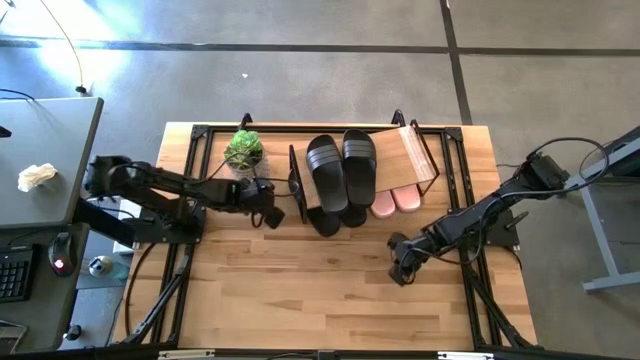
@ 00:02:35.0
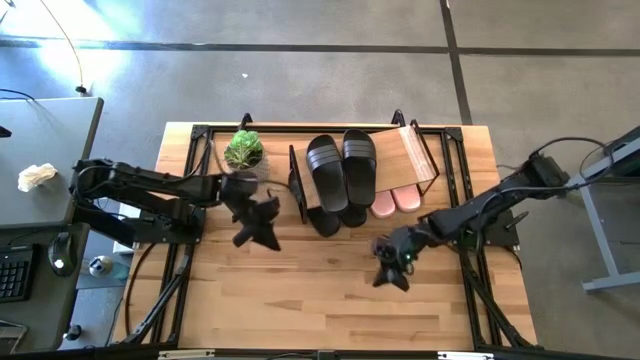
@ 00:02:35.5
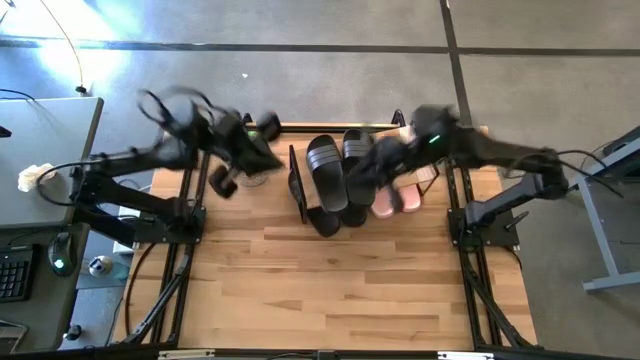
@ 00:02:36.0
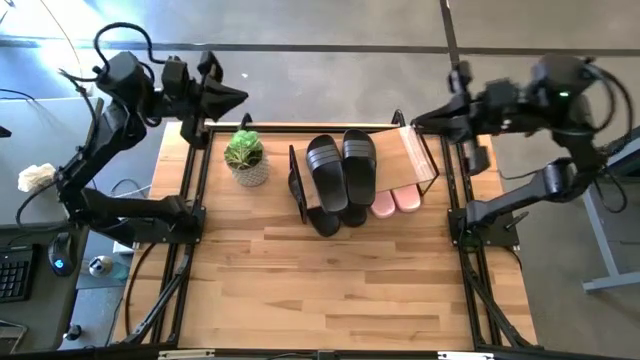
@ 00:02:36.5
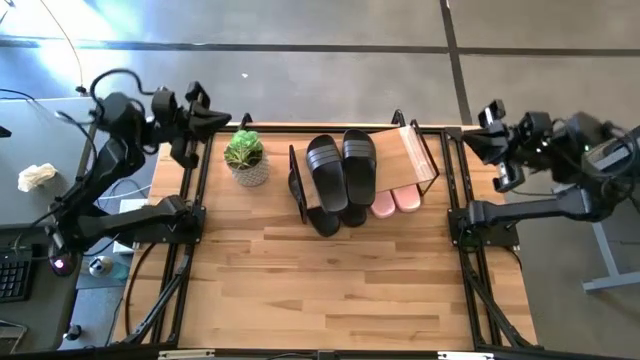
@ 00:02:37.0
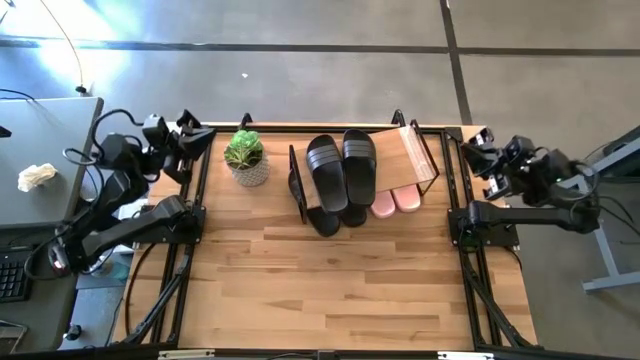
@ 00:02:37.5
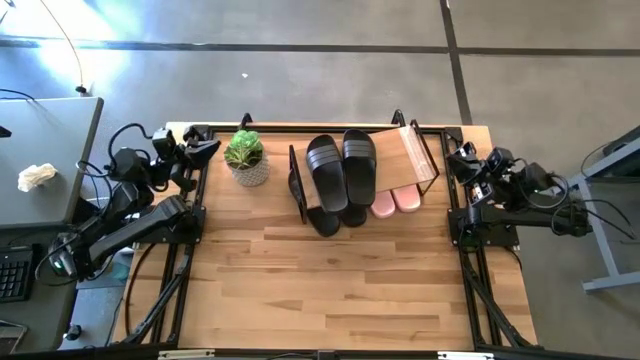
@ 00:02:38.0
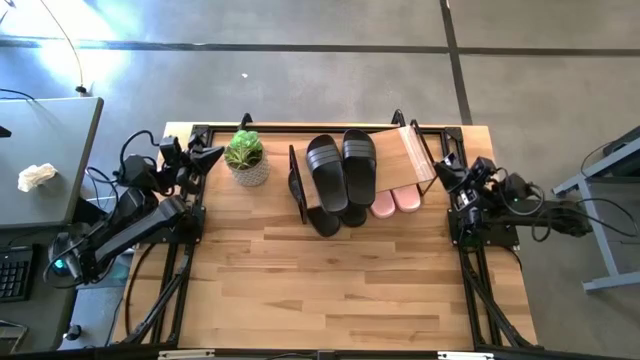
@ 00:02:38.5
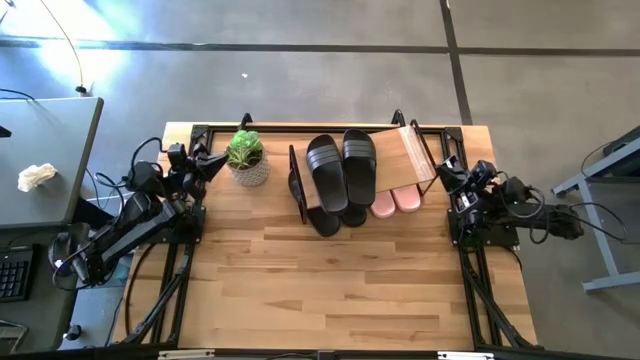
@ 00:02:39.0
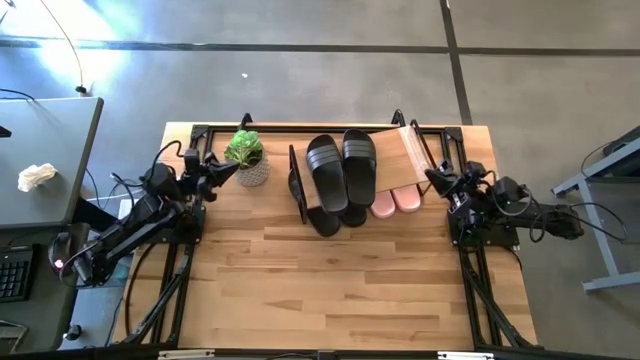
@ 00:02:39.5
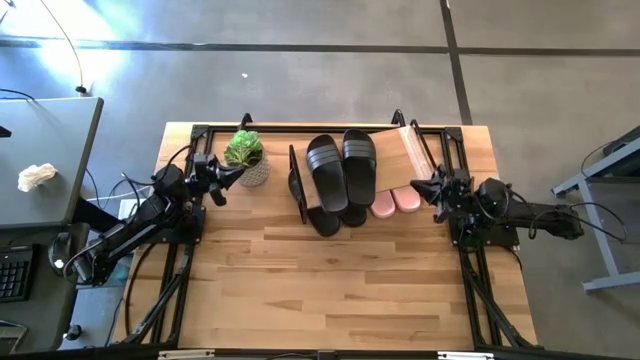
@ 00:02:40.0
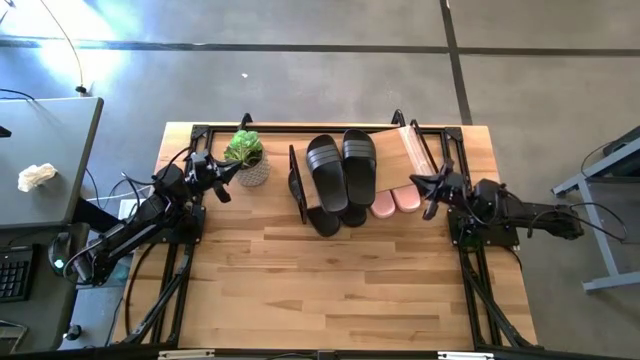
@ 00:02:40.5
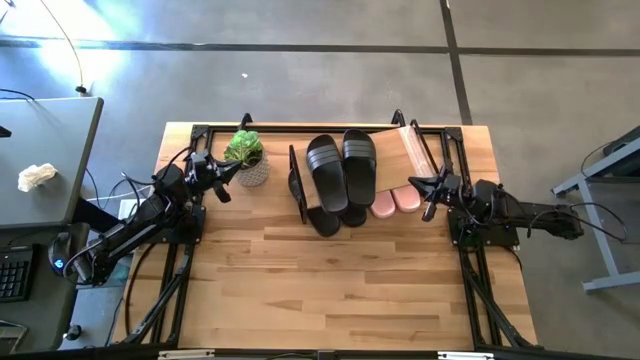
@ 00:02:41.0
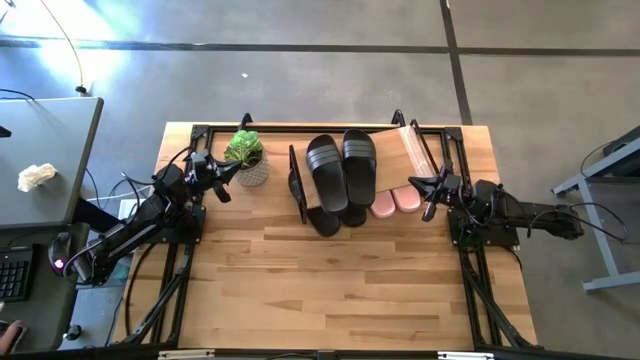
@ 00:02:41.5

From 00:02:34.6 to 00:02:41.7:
Task: Pick and place slides into the shelf
Return to Home Position

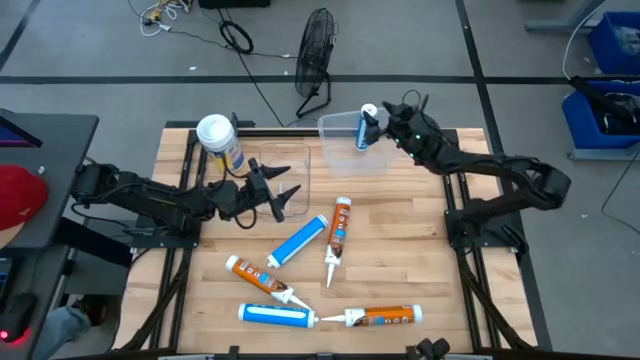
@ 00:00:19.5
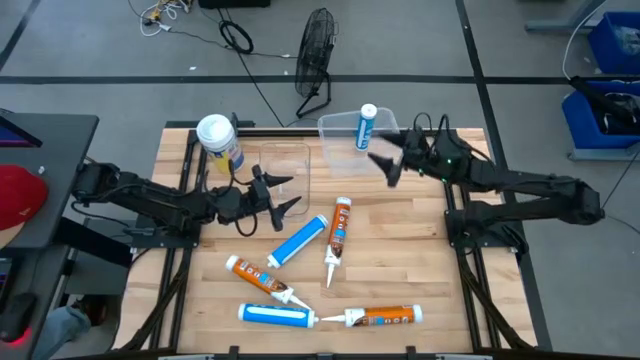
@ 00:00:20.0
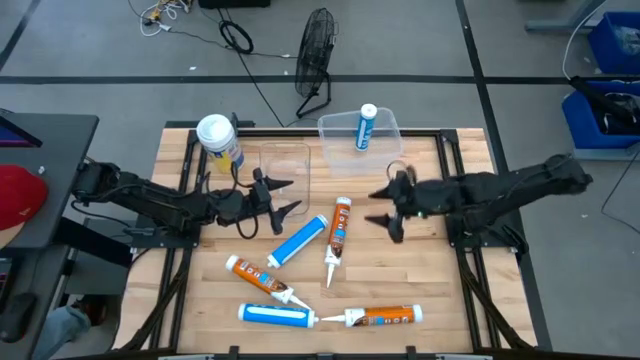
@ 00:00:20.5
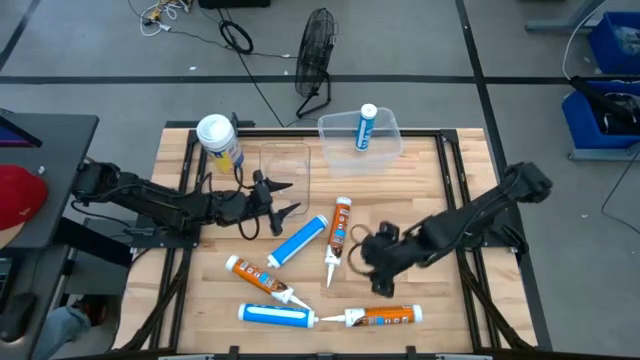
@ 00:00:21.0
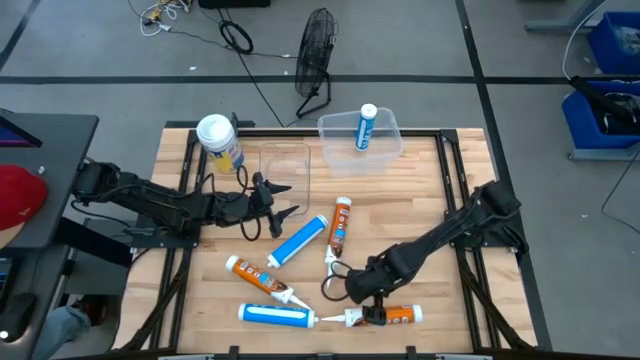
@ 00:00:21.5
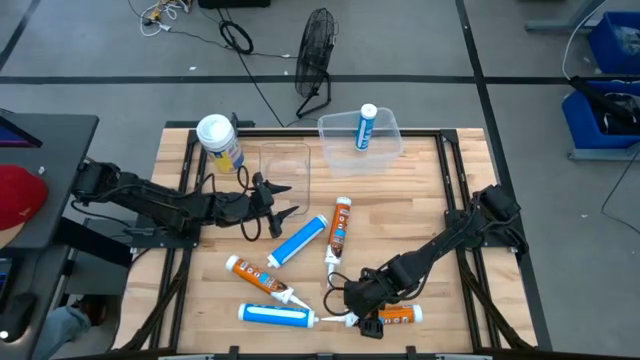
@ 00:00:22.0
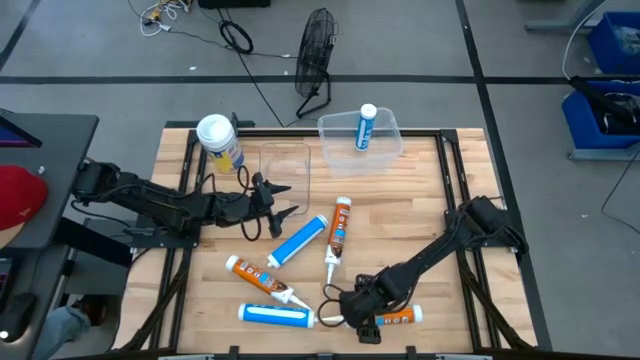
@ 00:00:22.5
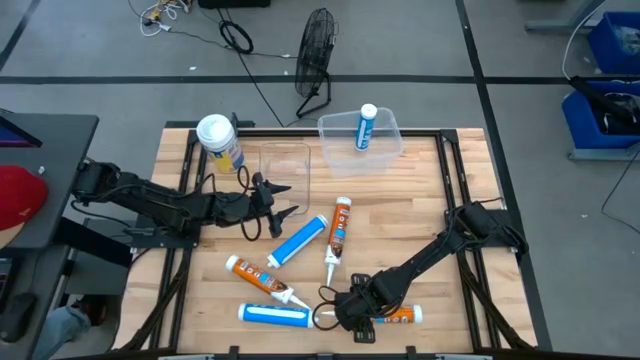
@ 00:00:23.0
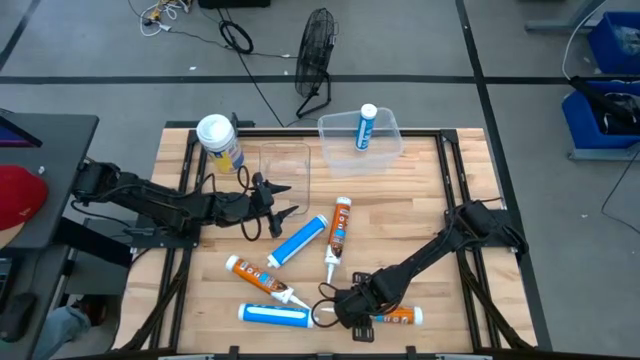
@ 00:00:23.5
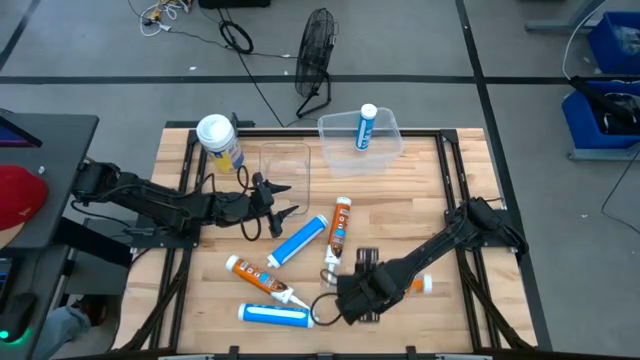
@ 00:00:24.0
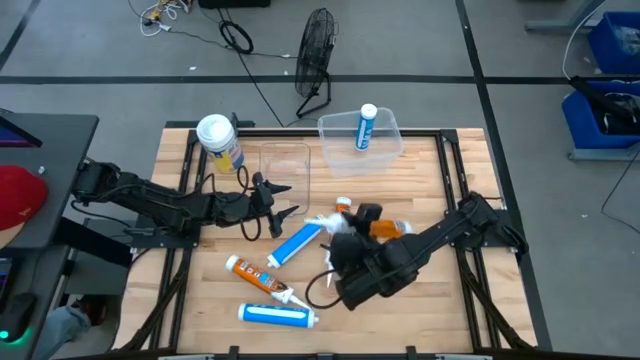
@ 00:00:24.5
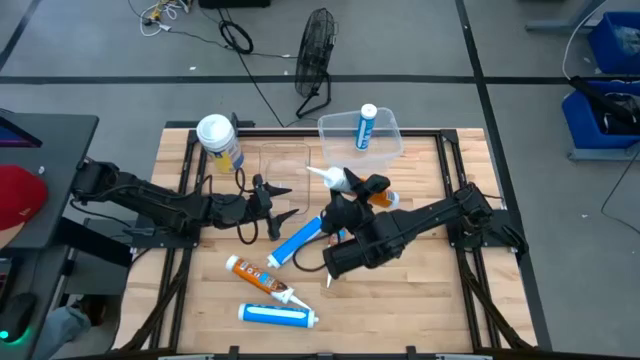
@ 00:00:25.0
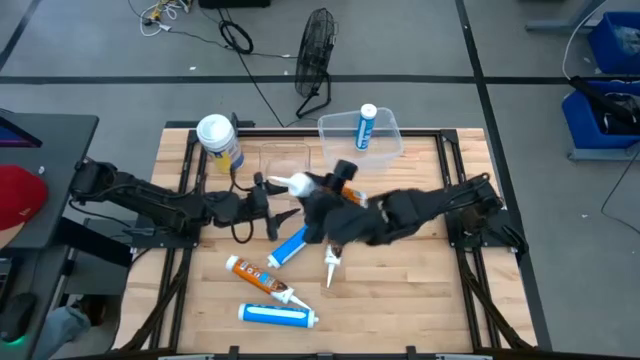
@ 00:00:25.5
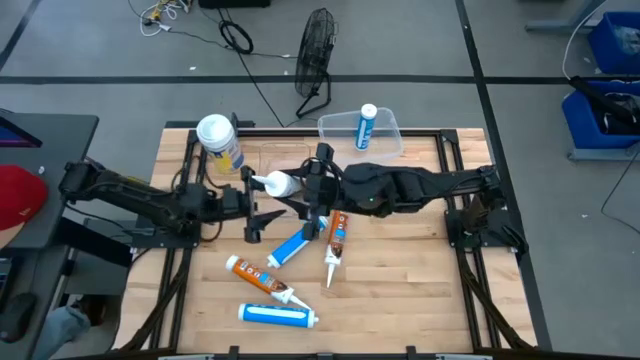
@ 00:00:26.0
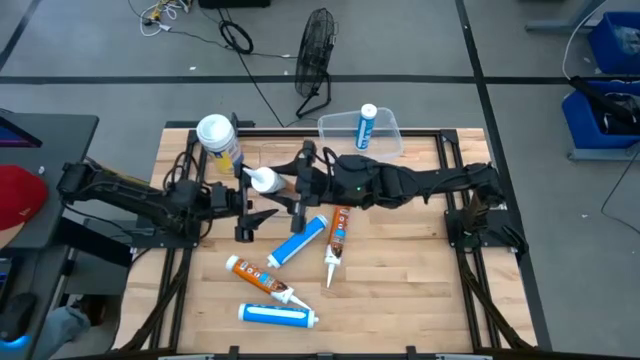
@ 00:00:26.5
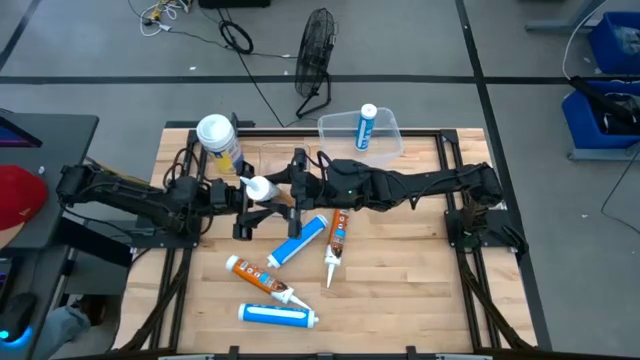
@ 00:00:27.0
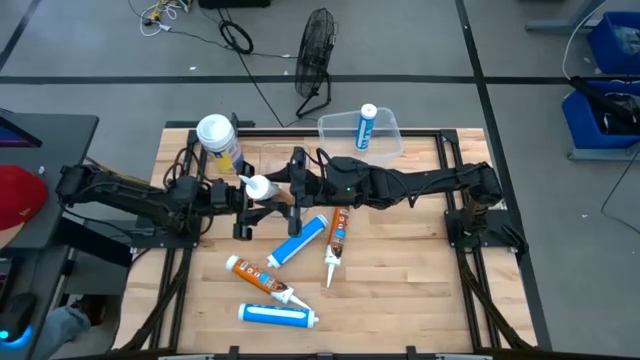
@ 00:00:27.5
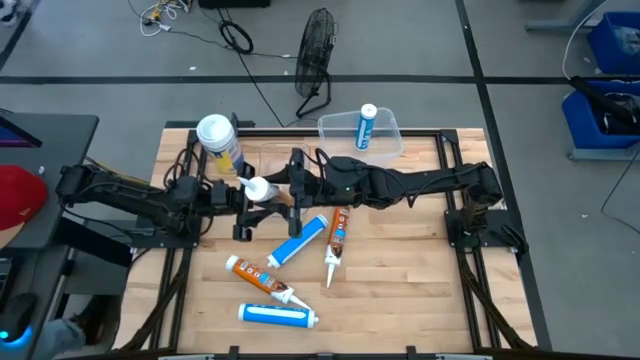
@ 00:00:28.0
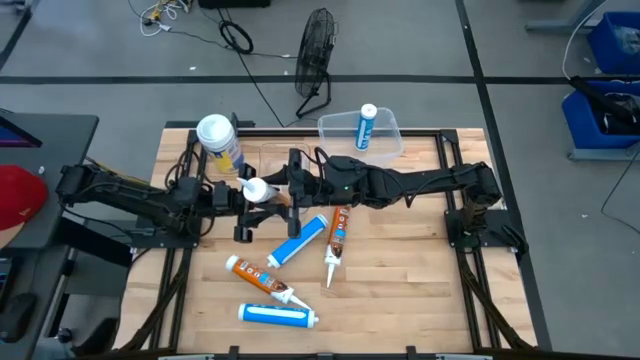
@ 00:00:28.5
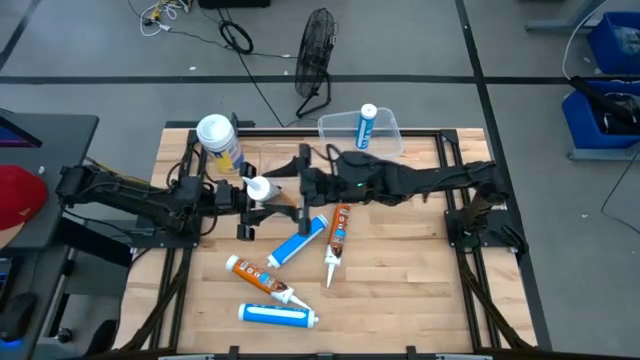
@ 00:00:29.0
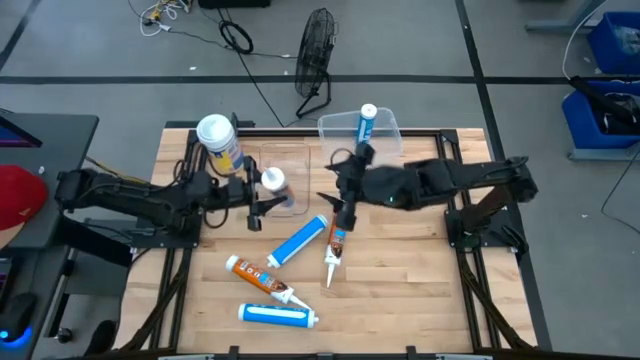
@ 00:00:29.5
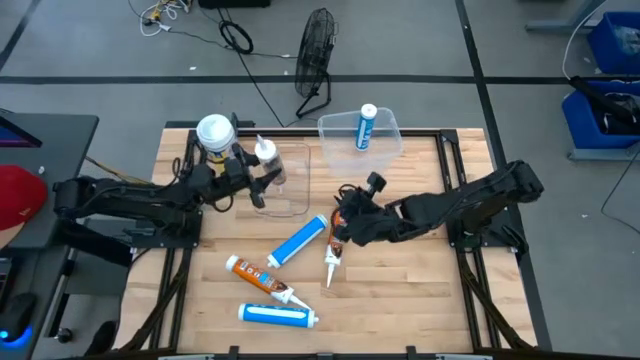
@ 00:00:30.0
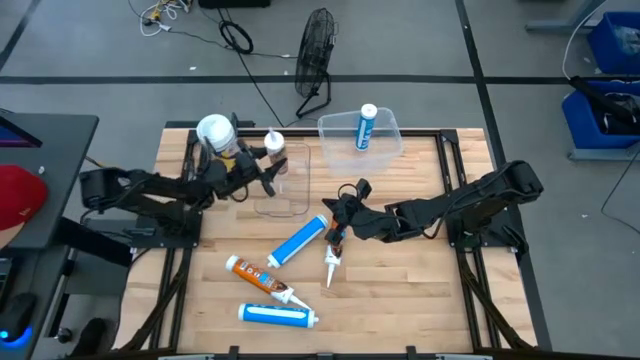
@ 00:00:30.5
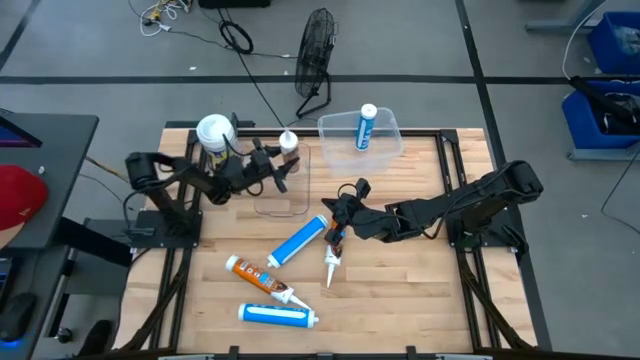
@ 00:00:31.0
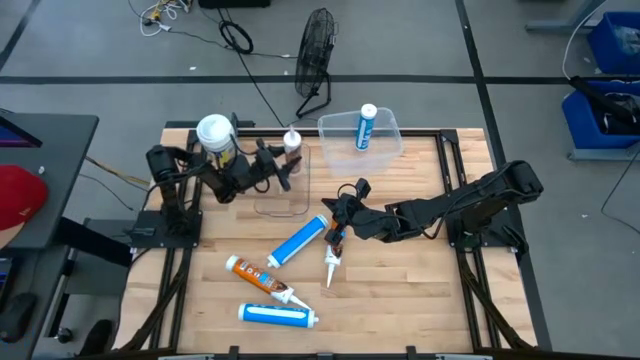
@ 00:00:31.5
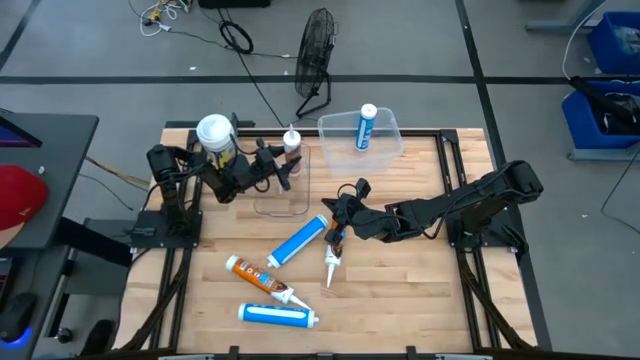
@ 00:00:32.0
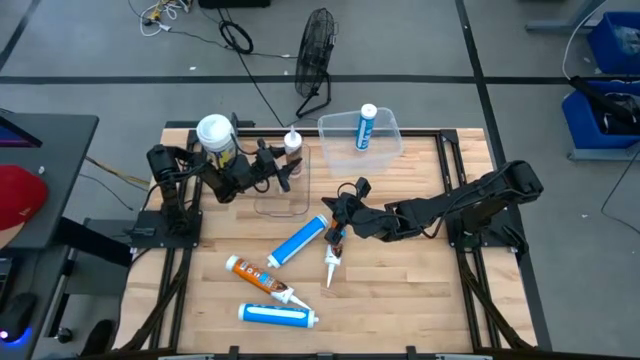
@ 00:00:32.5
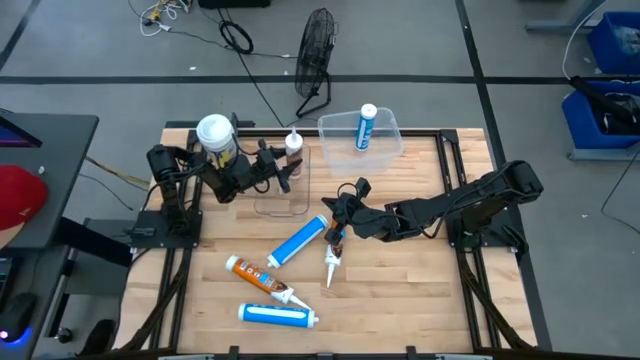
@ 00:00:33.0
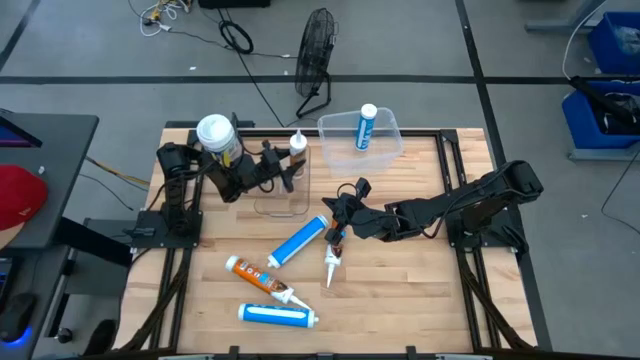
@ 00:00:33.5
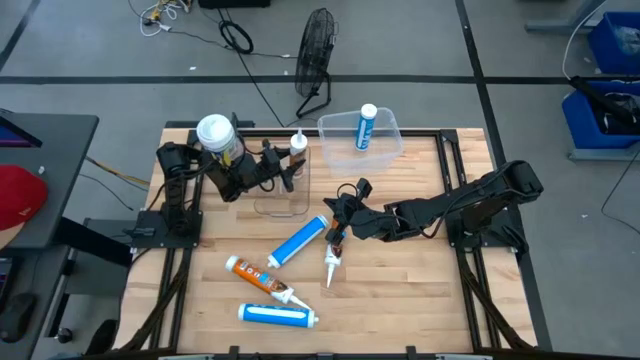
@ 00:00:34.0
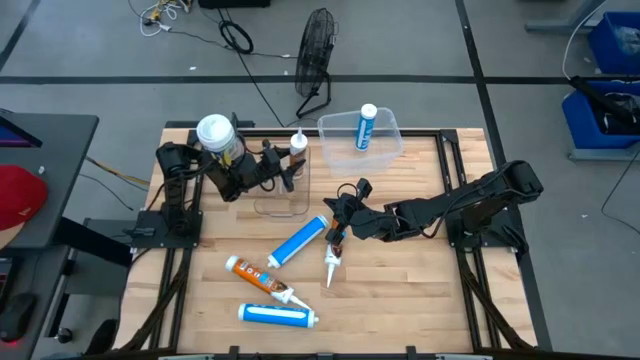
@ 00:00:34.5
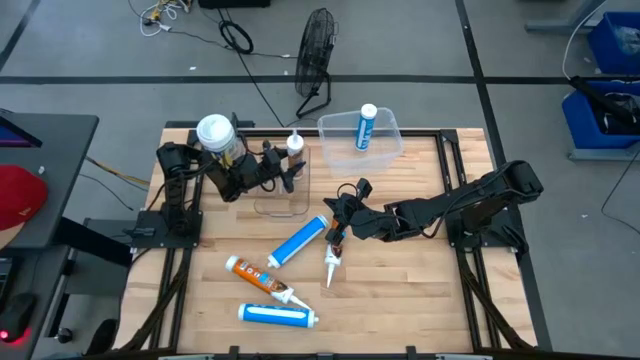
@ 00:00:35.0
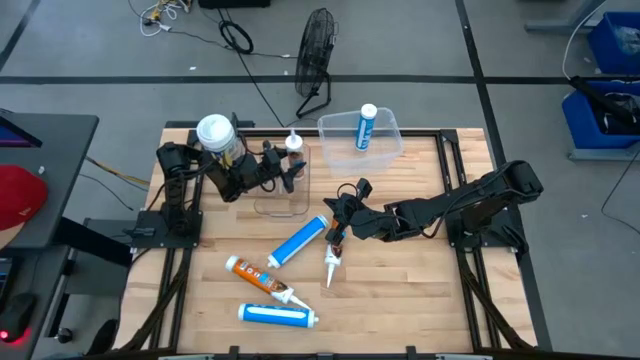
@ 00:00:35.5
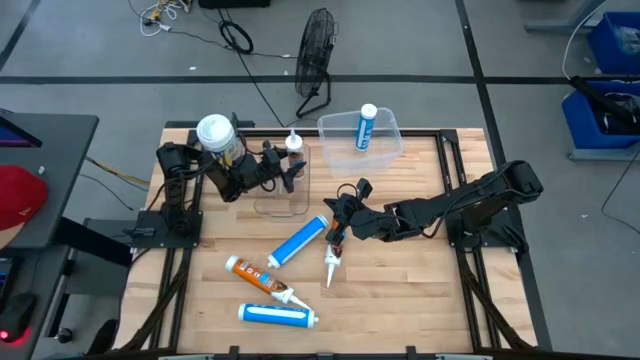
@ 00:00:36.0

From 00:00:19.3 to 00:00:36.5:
Task: Pick & place silicon tubes, Sealant and Lysol wipes
Put the bottom orange sealant into the transparent bin
